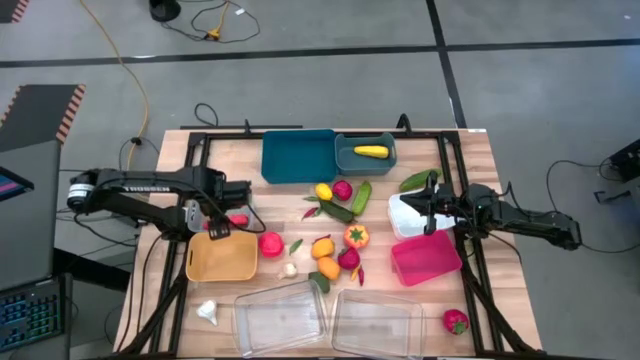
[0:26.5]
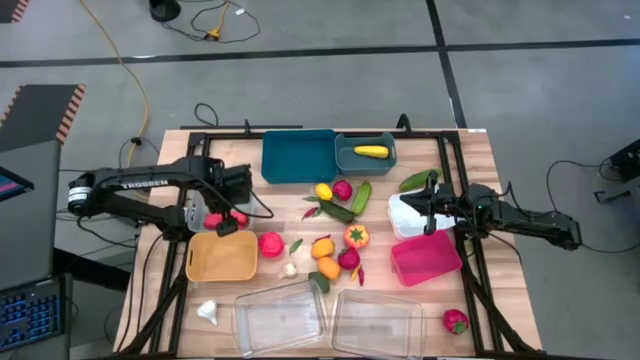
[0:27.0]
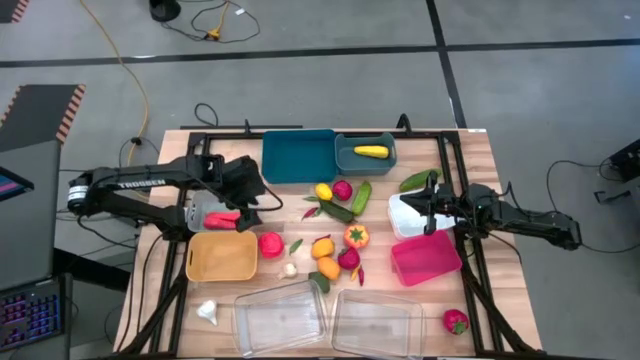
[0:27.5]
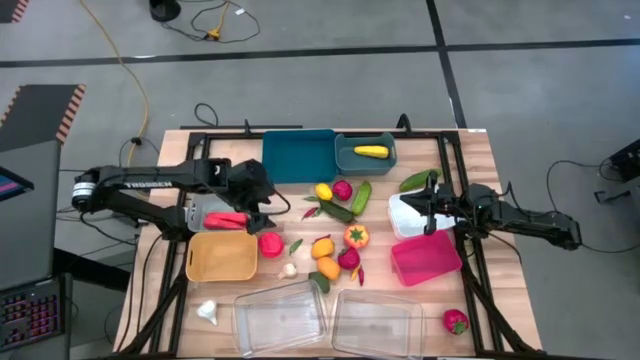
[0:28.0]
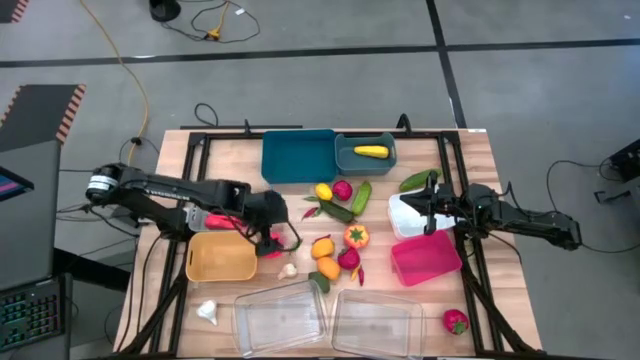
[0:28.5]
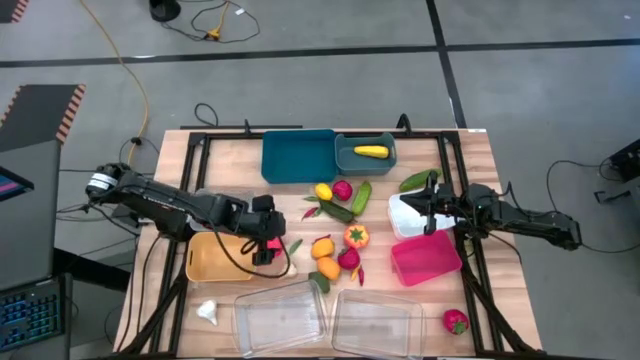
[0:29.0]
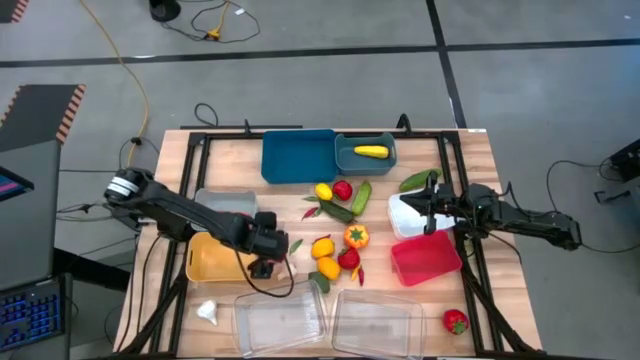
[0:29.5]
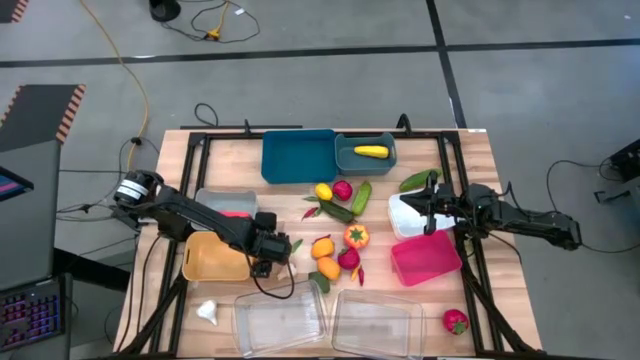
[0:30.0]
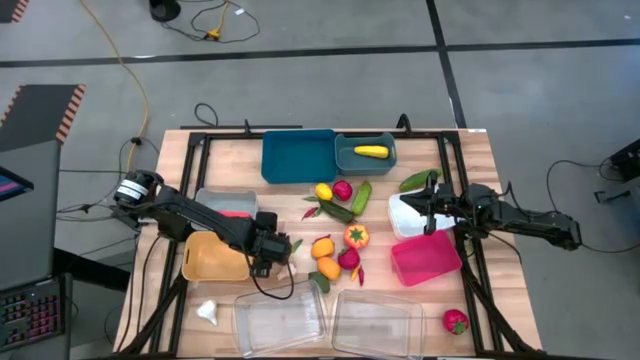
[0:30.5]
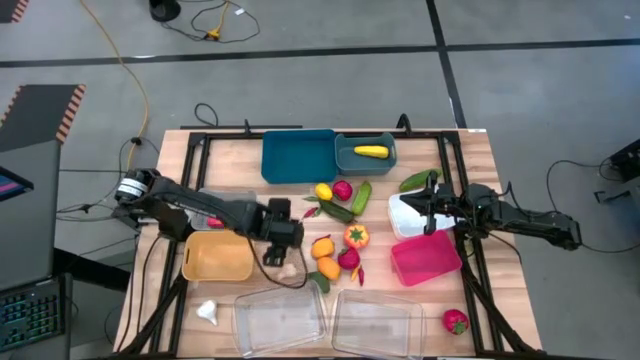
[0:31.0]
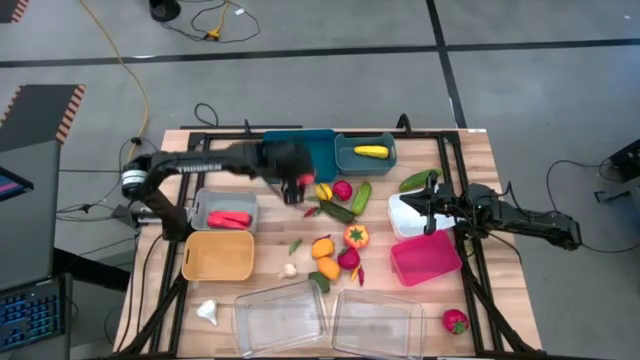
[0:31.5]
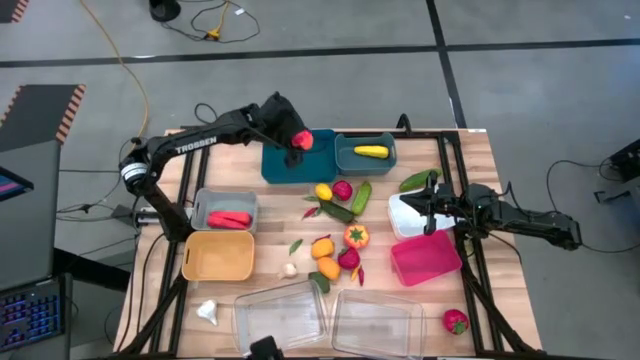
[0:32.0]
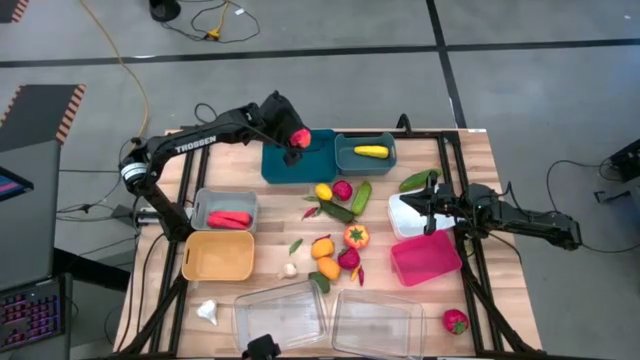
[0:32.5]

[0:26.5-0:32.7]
Task: Sort produce into baskets
Put the tomato into the blue bin

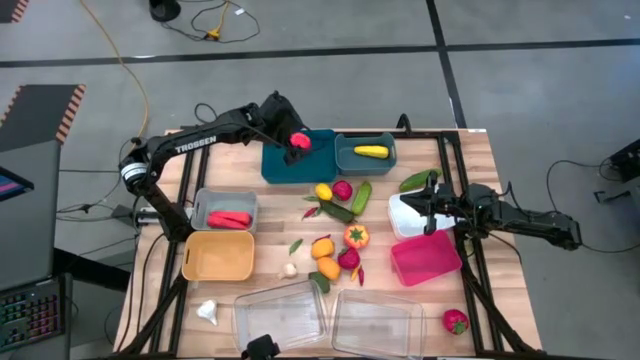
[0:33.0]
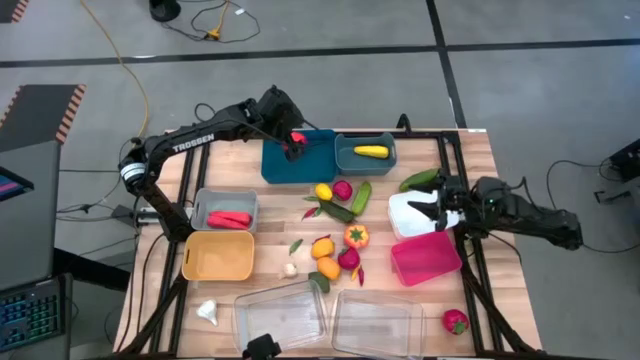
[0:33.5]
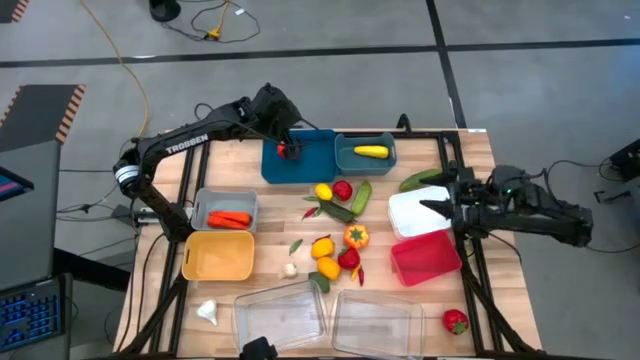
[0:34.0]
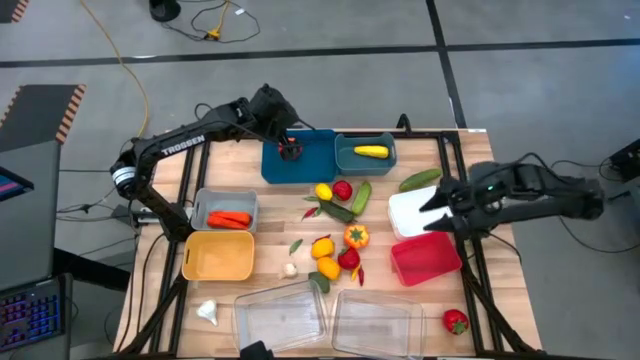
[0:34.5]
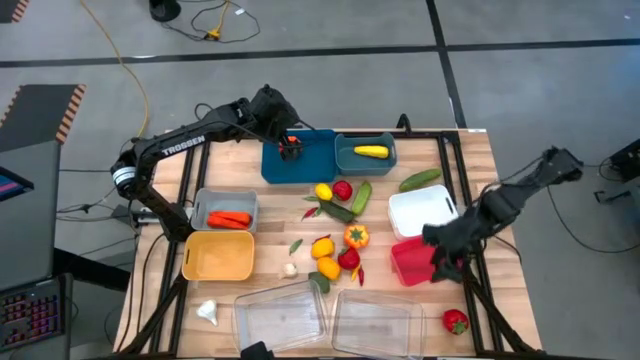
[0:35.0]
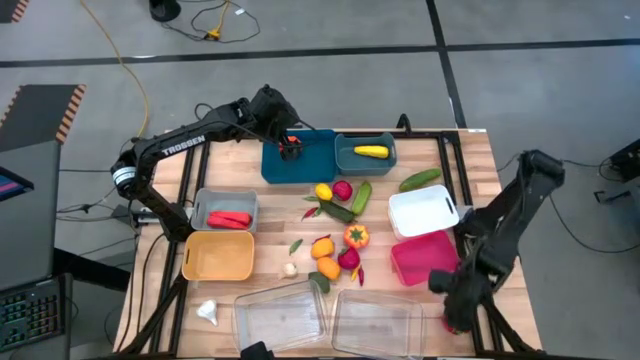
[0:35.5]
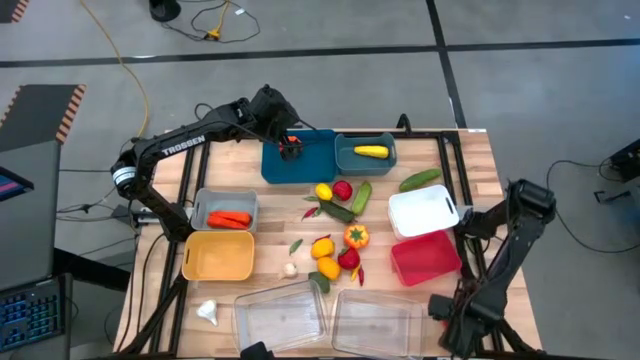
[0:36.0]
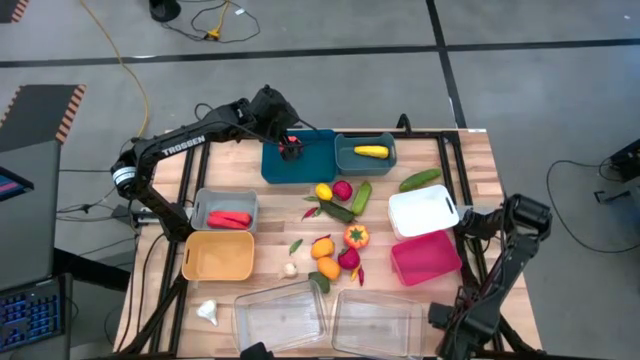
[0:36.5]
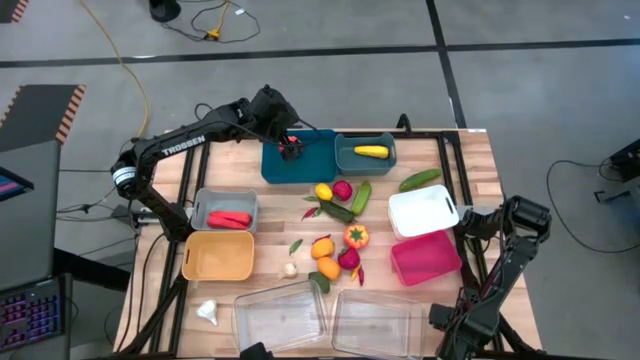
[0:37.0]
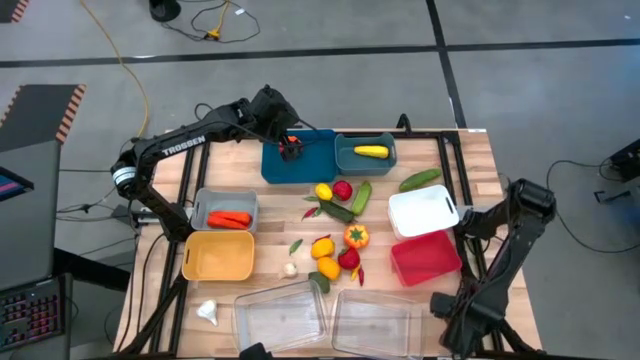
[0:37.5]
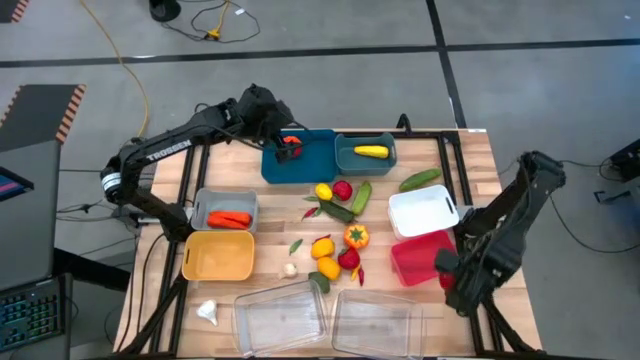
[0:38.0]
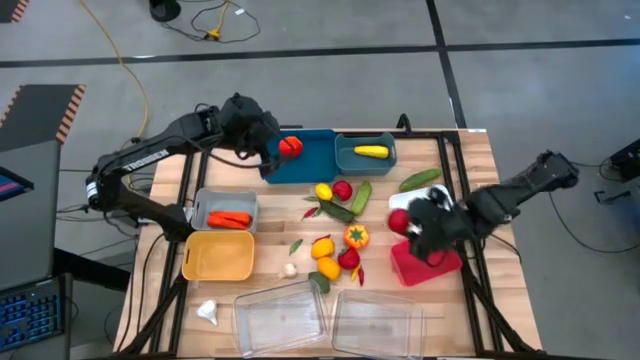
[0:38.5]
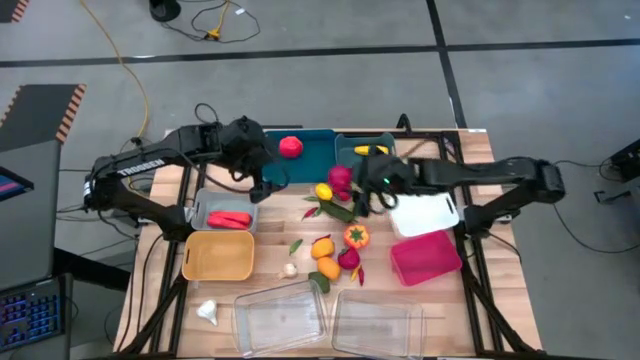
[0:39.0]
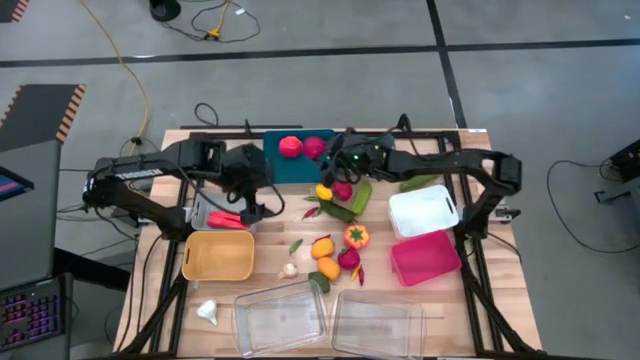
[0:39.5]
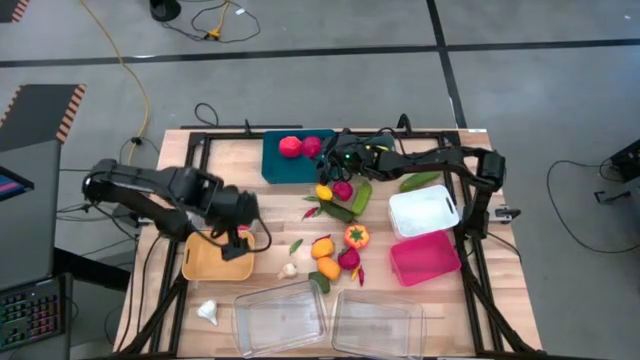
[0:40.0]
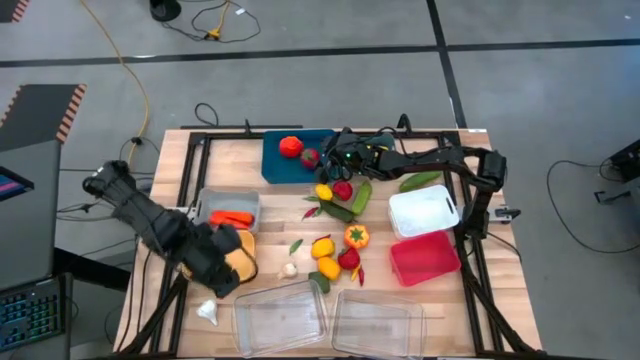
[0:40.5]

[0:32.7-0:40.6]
Put the tomato into the blue bin

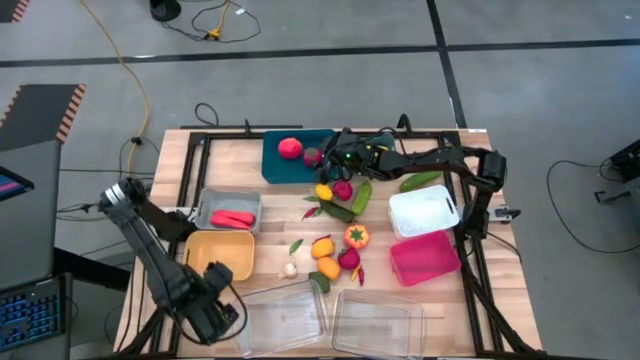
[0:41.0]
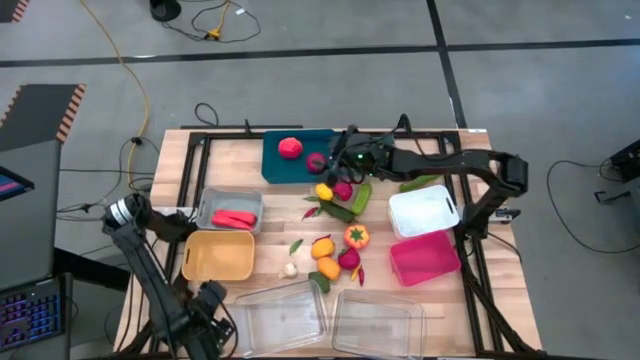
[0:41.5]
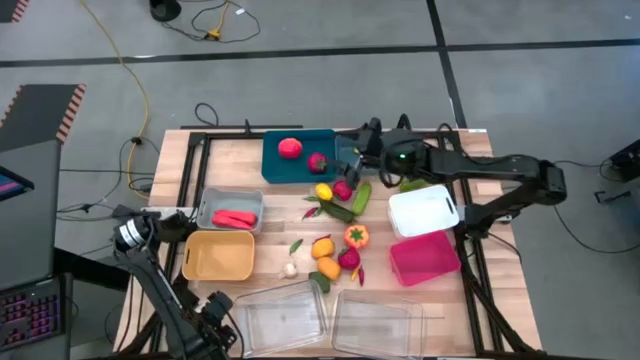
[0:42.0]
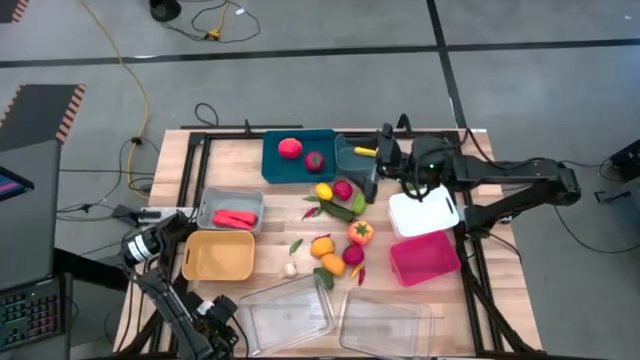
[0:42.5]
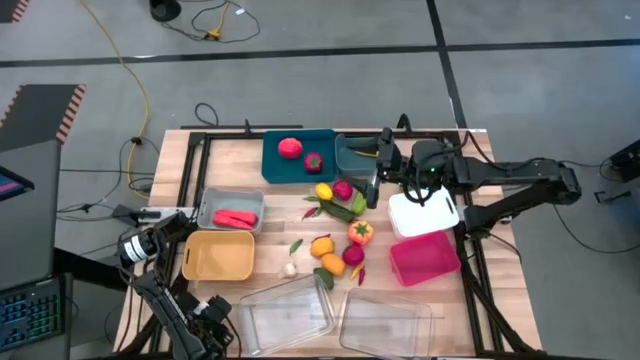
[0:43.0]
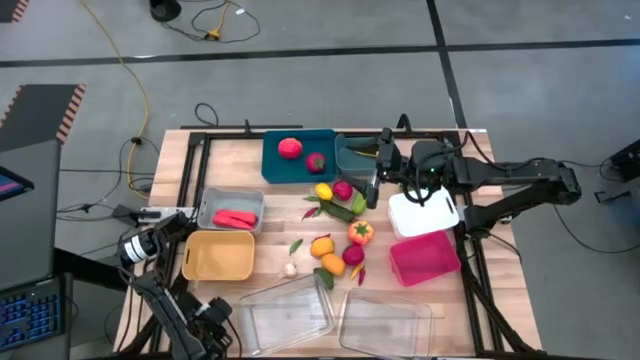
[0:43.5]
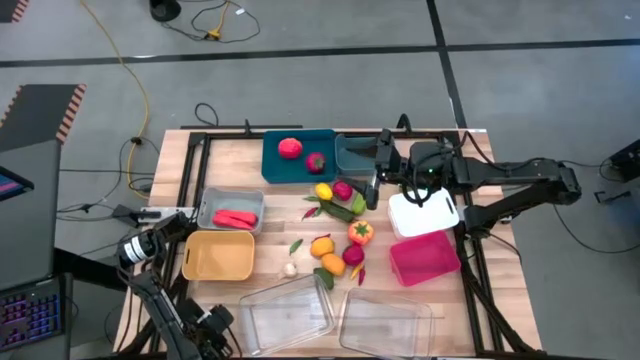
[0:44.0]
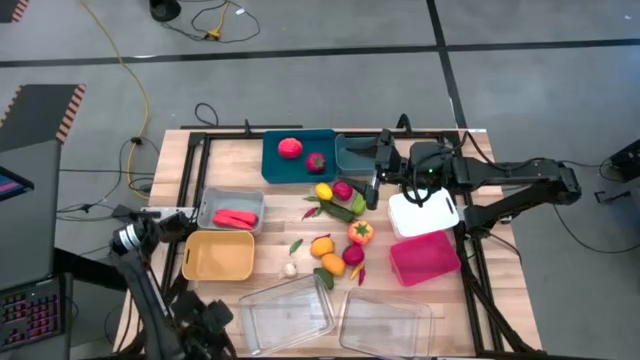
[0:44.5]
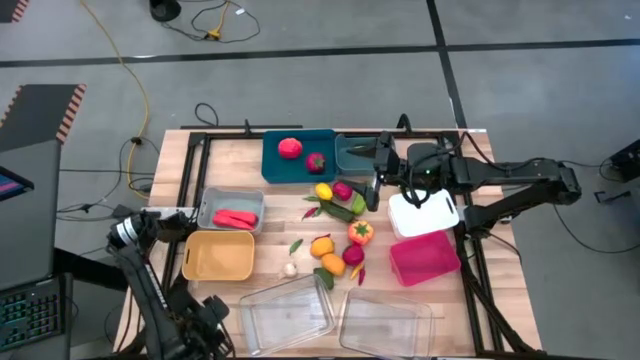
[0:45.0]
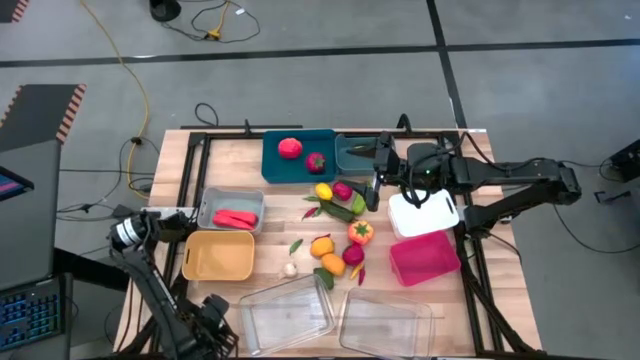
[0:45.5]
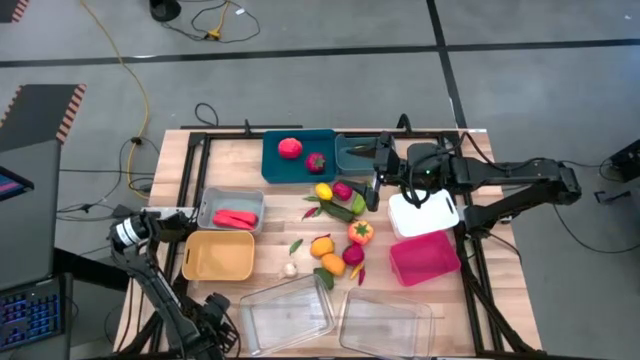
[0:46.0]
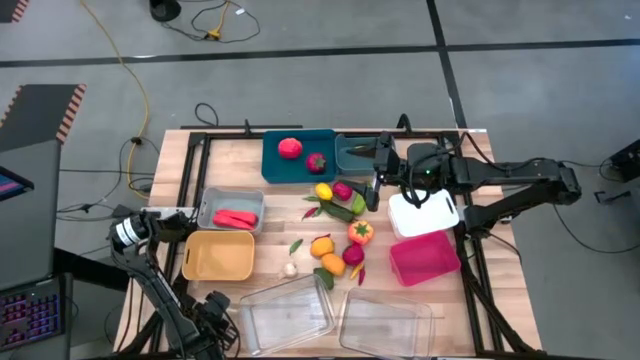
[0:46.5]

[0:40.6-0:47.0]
Put the garlic into the yellow bin
